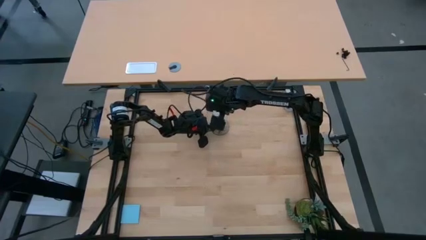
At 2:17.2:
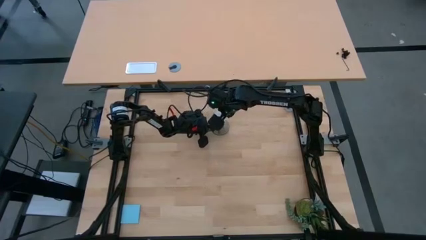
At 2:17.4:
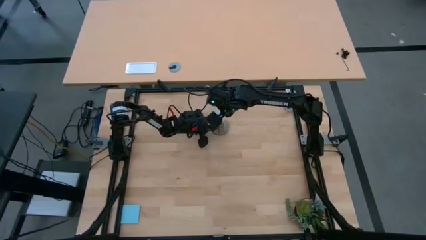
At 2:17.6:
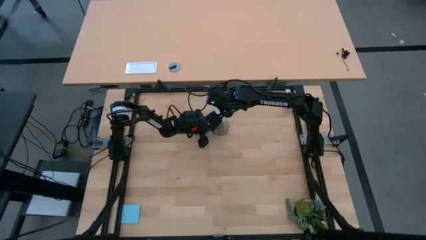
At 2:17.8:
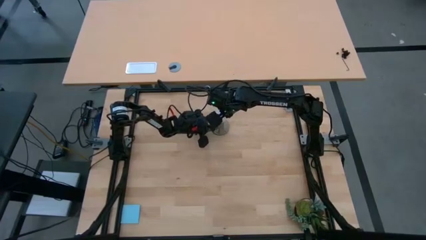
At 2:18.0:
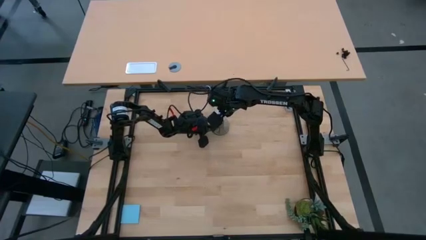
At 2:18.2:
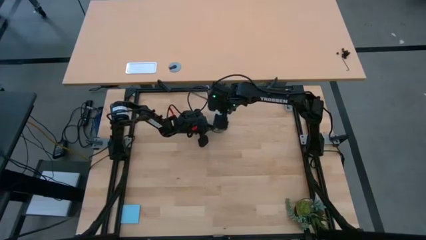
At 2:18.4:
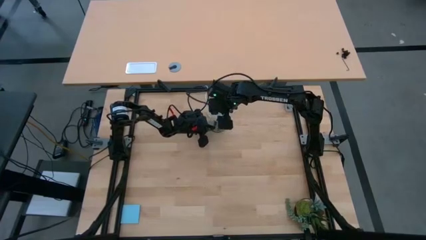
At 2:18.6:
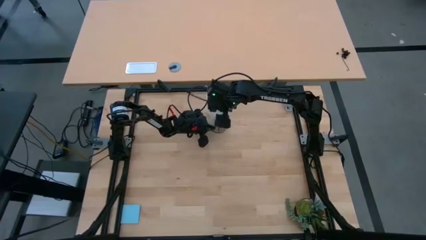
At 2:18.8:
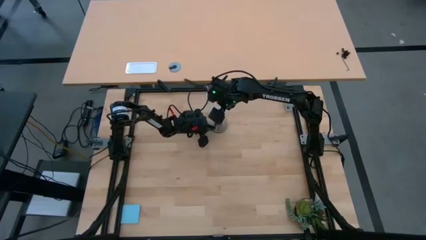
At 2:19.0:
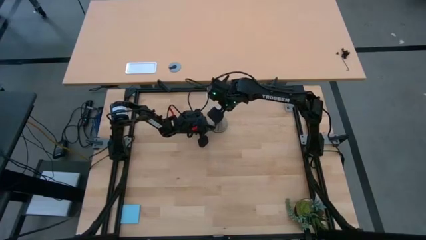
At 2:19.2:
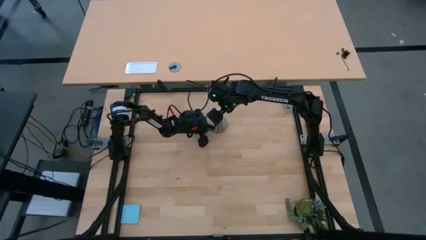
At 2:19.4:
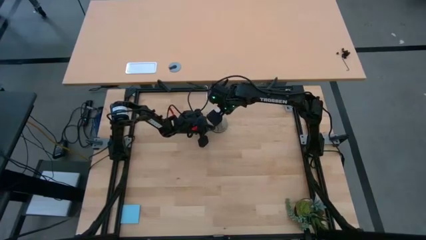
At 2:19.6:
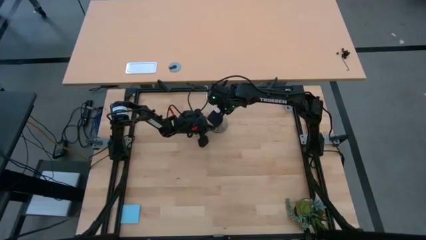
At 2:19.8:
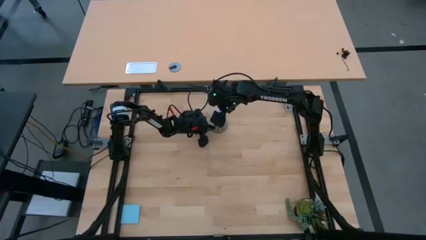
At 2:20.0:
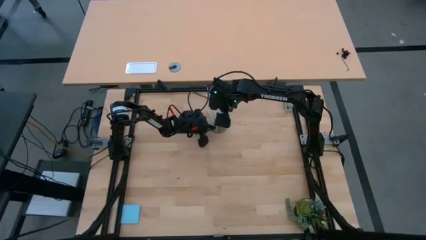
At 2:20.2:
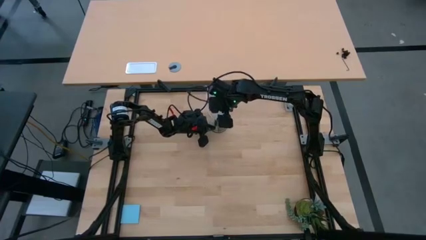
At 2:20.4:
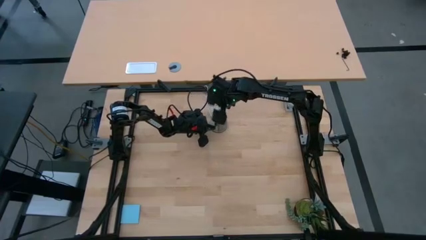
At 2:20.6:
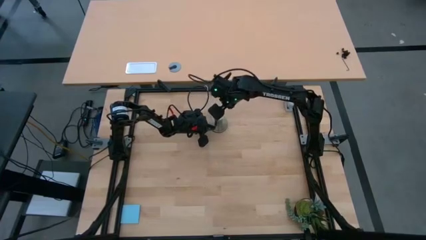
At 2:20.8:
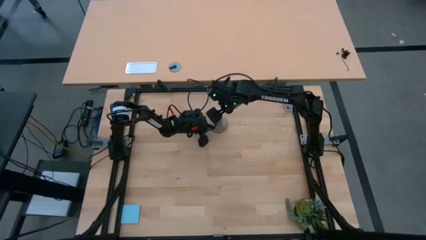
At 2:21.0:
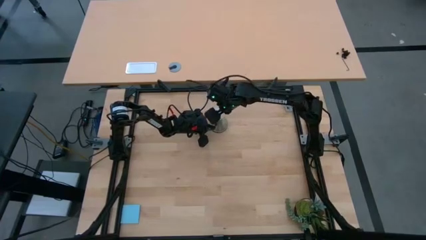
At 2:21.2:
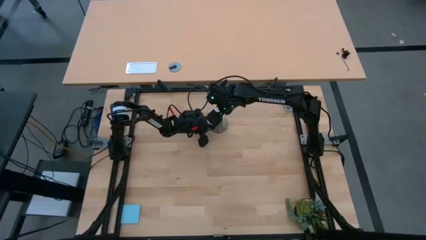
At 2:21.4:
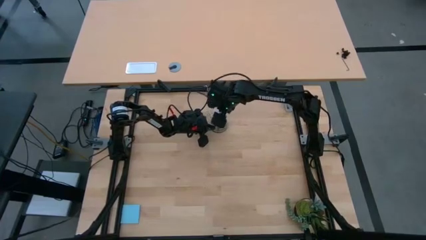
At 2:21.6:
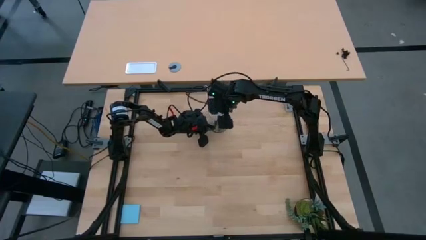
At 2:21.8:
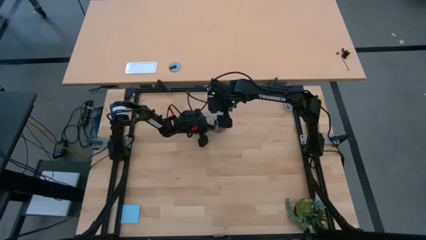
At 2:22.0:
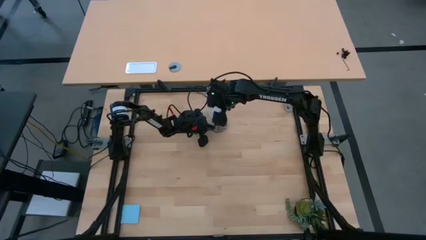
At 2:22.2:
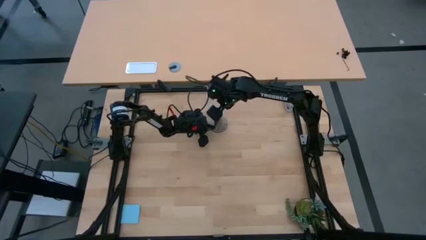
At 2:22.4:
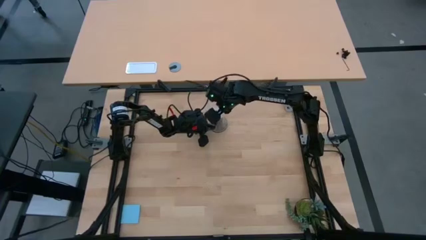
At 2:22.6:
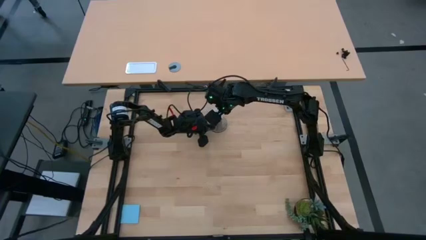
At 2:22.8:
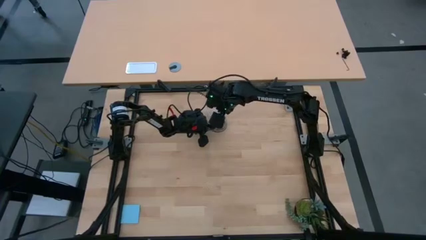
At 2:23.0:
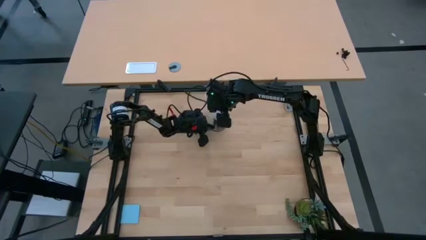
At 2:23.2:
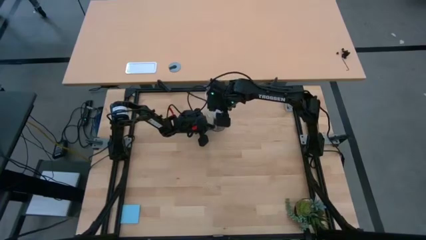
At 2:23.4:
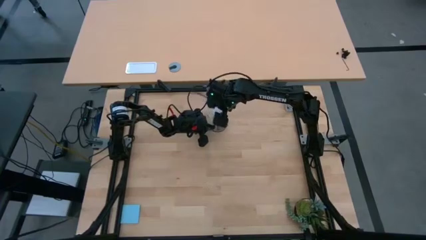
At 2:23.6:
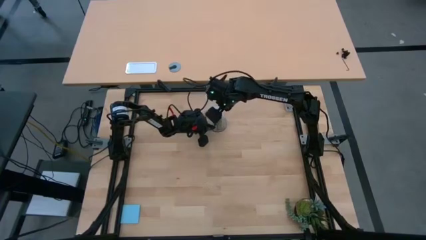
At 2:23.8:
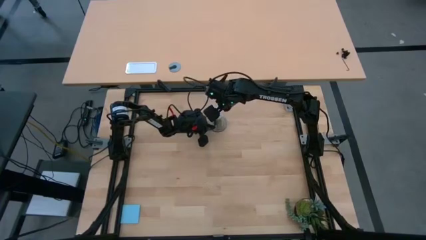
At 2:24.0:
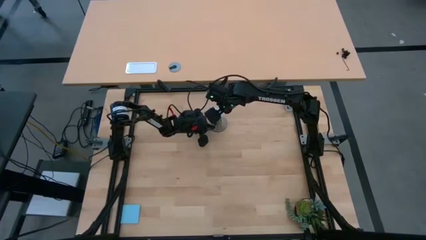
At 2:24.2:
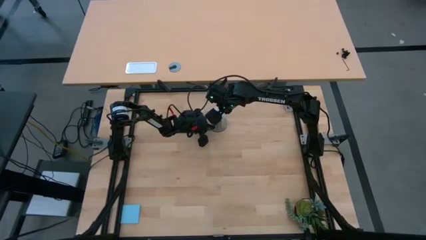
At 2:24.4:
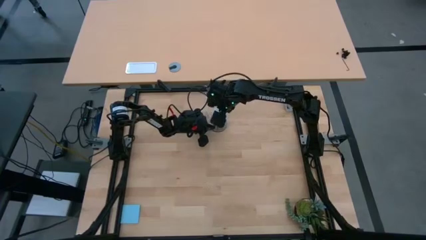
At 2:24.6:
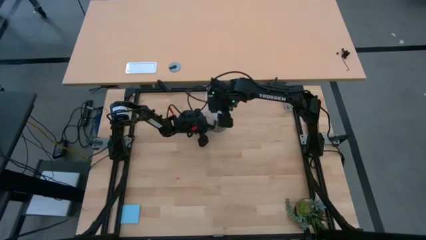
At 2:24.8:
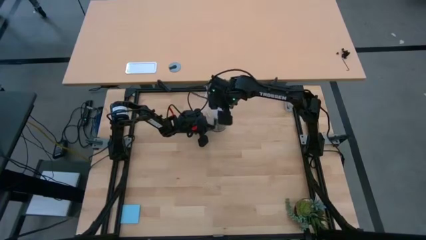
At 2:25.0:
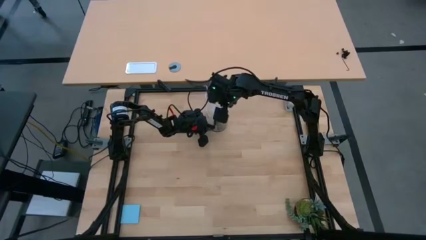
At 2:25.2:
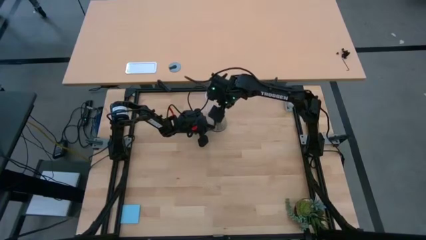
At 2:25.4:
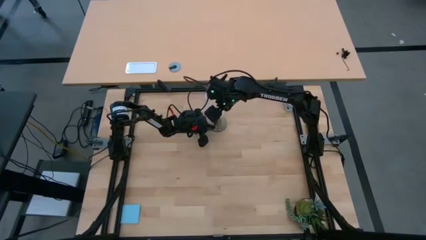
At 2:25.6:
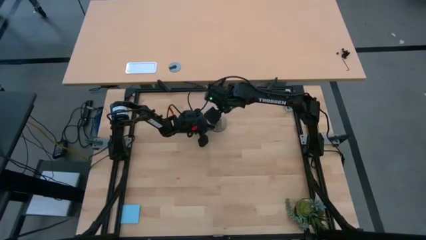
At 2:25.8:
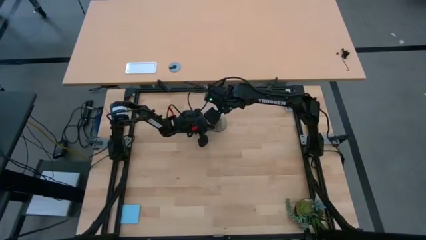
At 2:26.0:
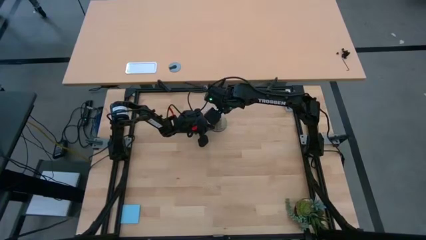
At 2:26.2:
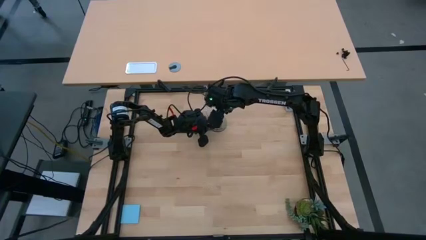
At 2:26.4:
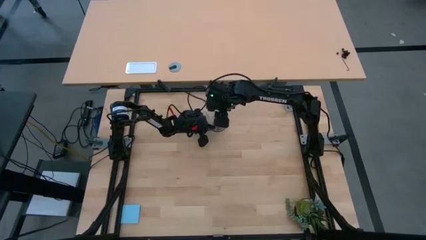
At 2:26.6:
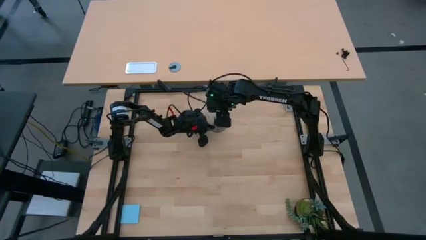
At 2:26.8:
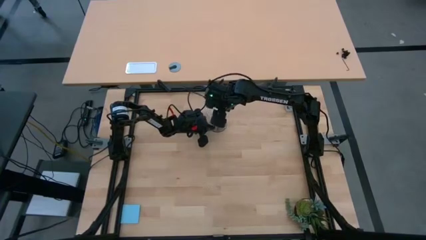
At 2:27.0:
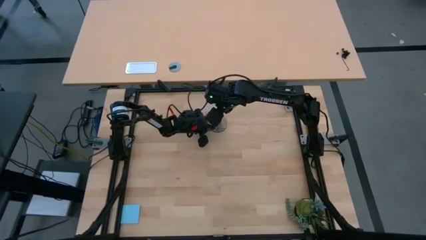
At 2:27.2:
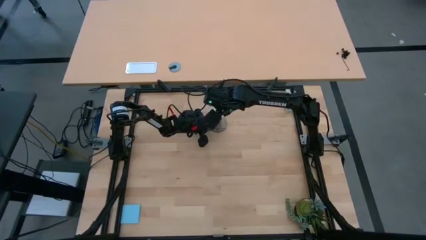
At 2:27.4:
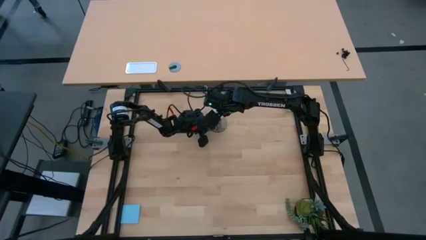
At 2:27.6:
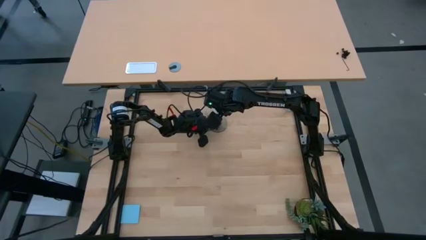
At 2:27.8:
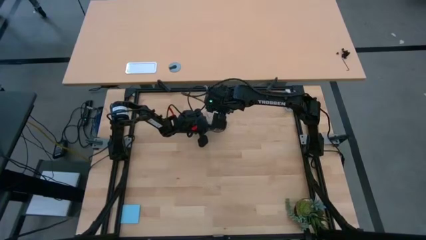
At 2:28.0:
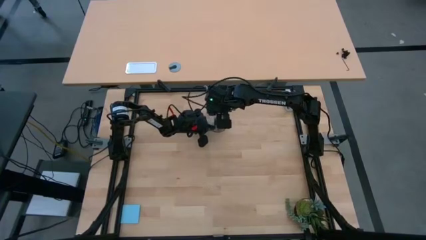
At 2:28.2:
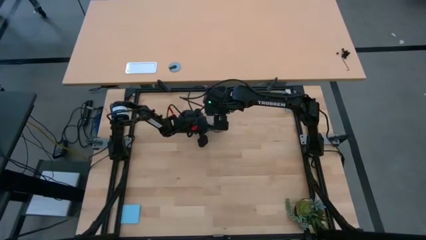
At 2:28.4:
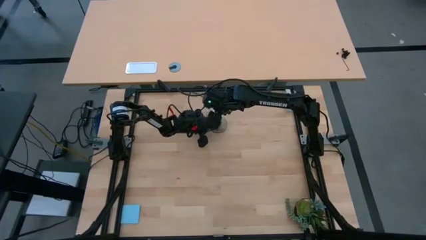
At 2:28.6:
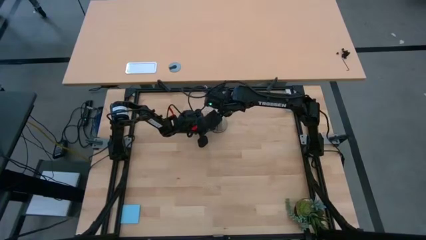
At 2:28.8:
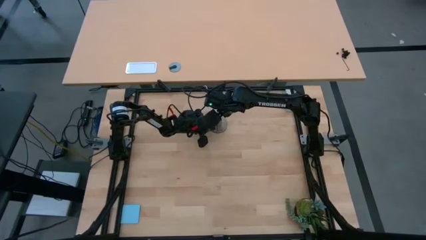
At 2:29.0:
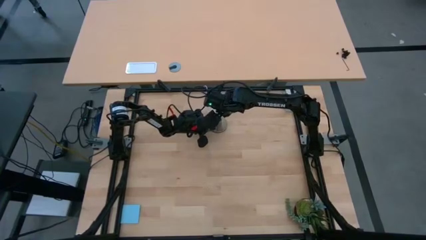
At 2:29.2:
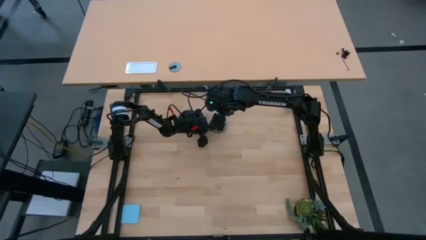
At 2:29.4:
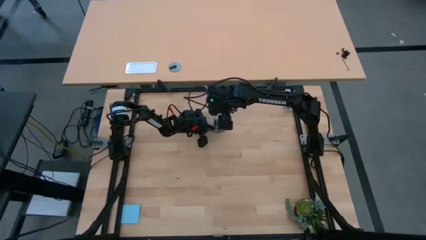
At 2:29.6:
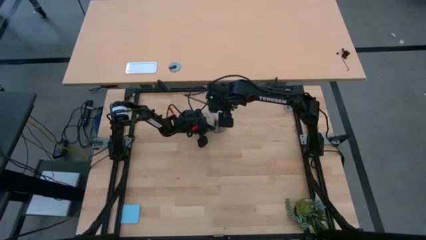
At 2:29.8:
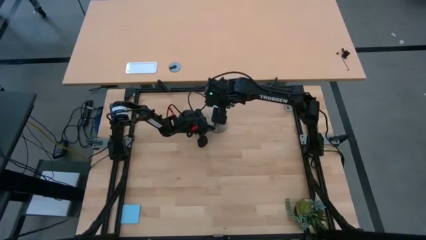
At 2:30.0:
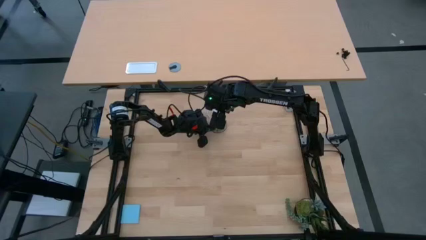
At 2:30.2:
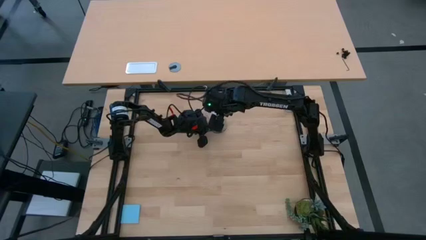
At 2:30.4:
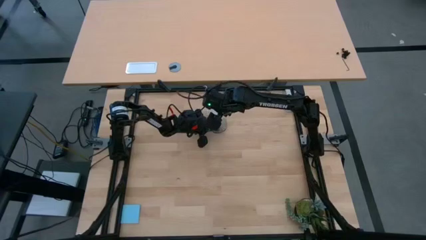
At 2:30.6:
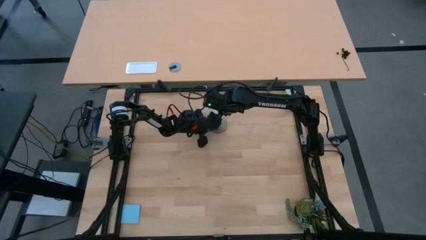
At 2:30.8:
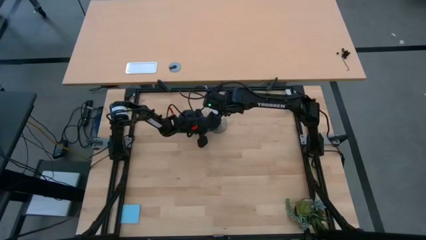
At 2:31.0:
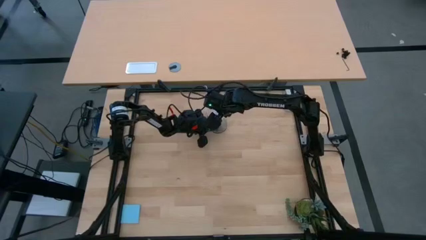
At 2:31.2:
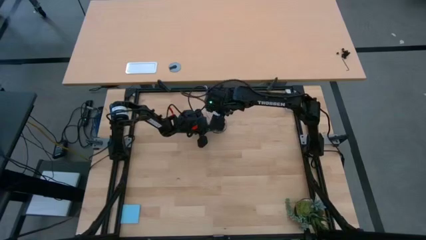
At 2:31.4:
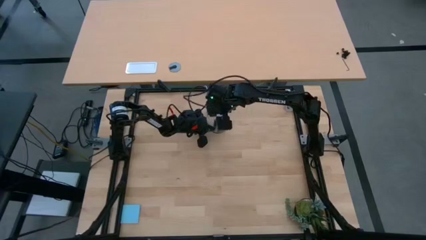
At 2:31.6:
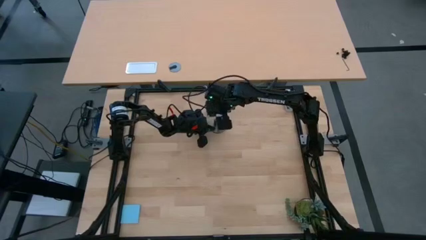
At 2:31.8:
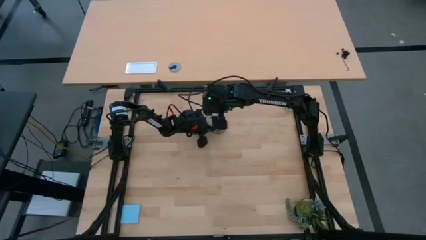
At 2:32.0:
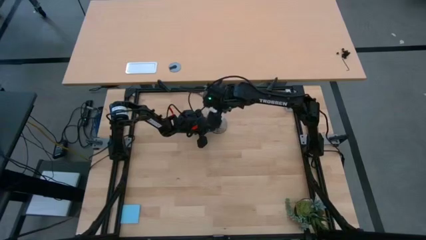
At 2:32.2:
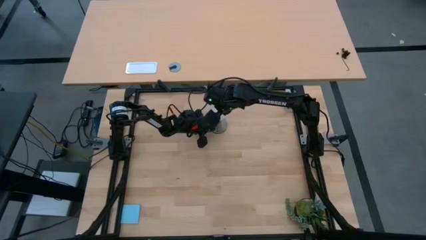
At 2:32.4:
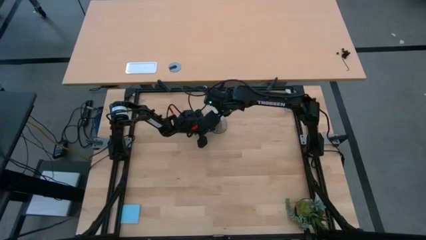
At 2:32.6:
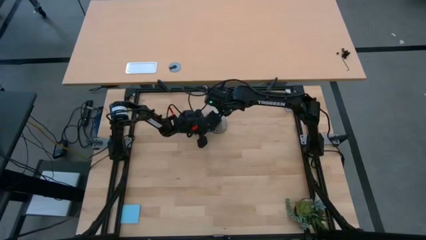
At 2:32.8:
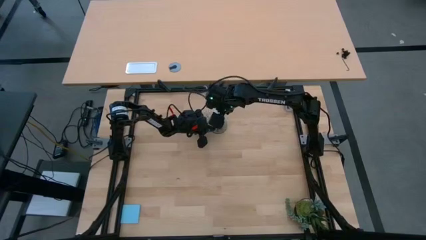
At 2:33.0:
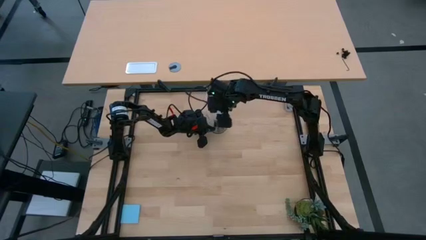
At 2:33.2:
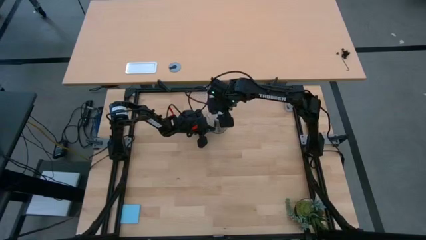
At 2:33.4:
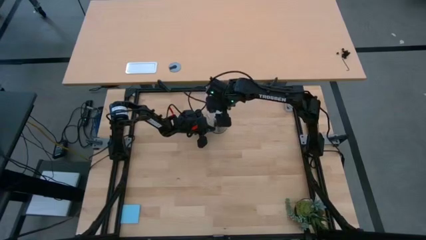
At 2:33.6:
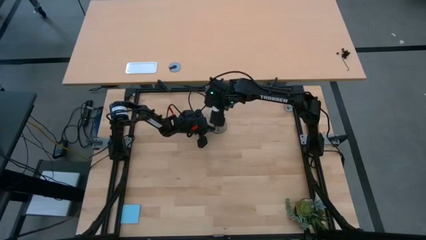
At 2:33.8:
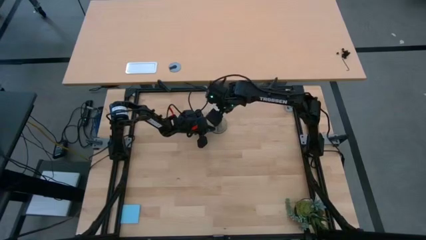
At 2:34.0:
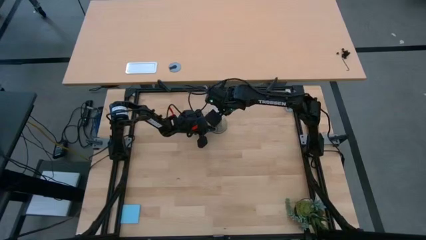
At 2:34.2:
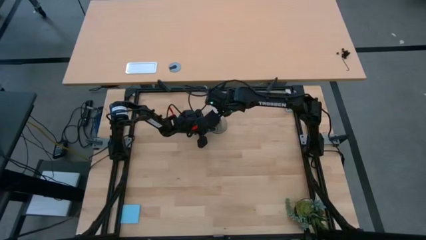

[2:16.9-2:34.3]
Task: Screw lightbulb
Remove the light bulb from the table lamp holder
